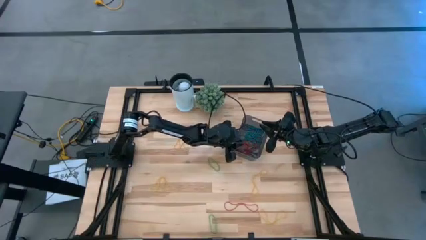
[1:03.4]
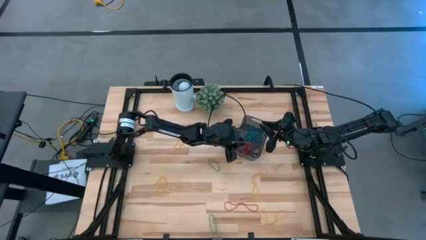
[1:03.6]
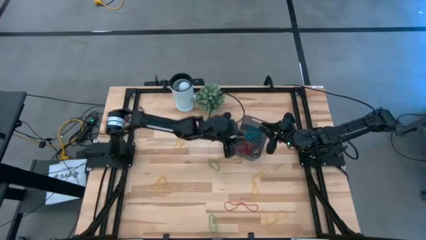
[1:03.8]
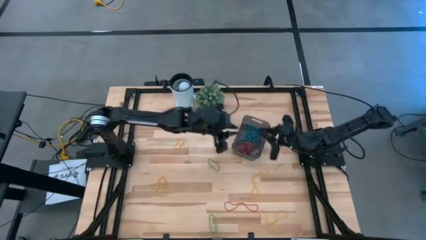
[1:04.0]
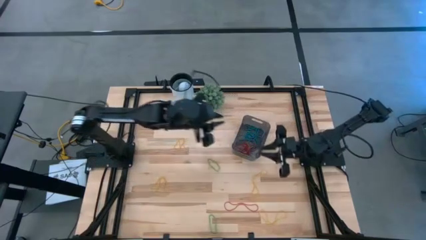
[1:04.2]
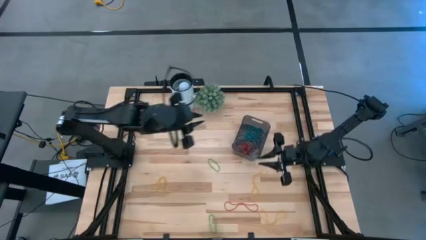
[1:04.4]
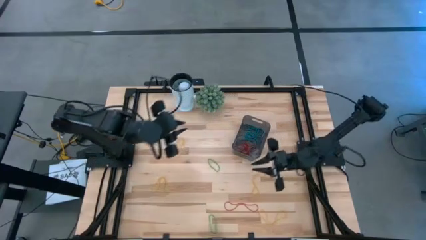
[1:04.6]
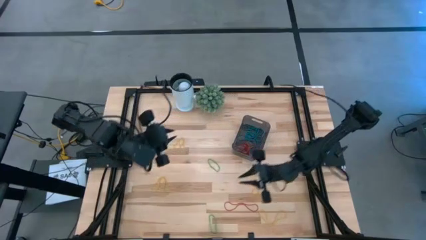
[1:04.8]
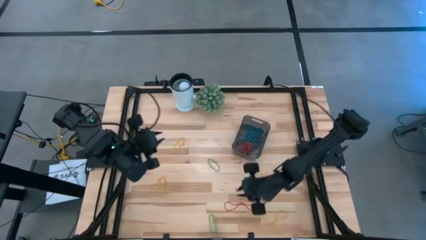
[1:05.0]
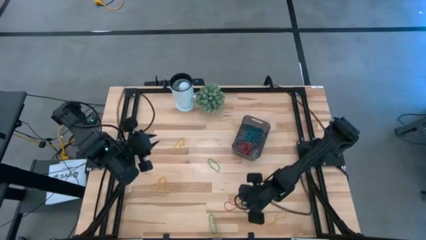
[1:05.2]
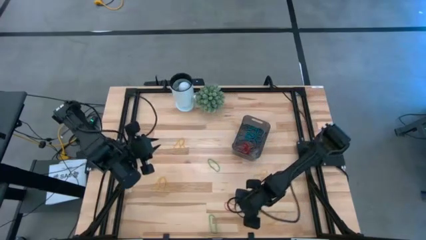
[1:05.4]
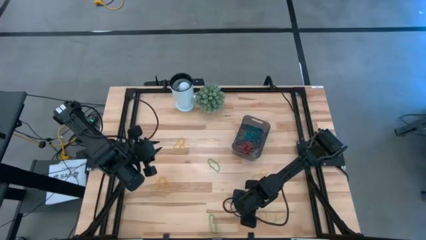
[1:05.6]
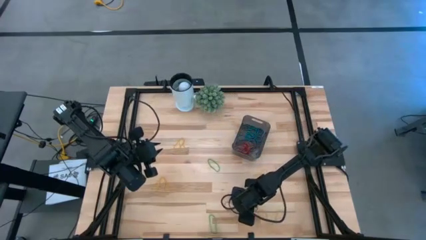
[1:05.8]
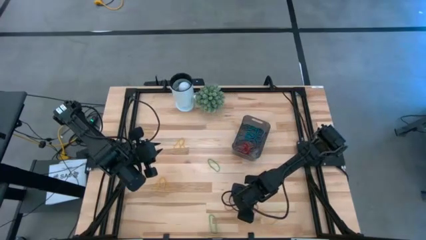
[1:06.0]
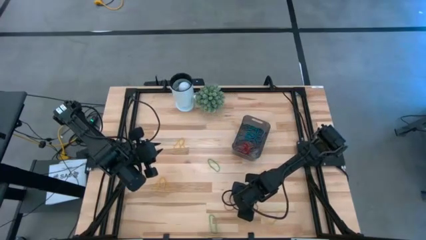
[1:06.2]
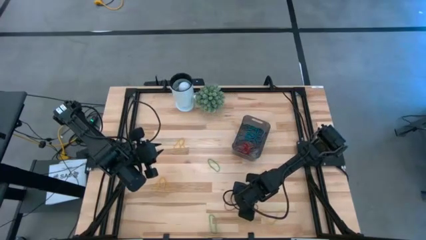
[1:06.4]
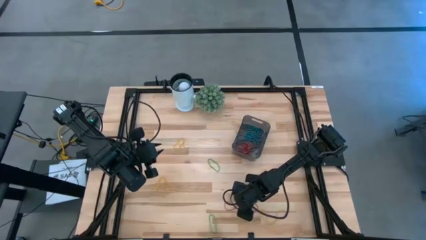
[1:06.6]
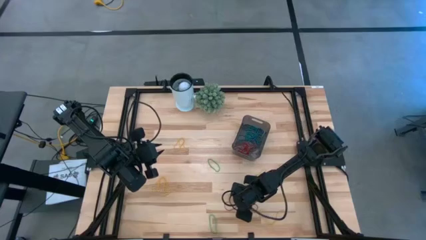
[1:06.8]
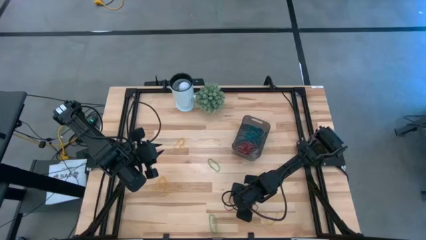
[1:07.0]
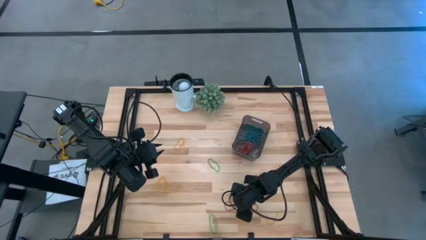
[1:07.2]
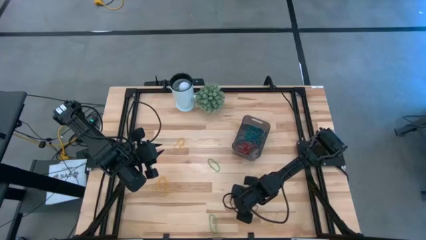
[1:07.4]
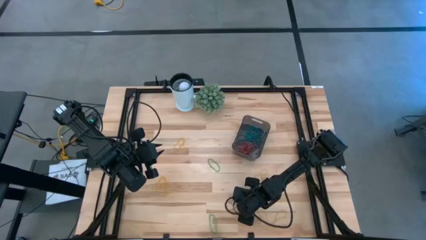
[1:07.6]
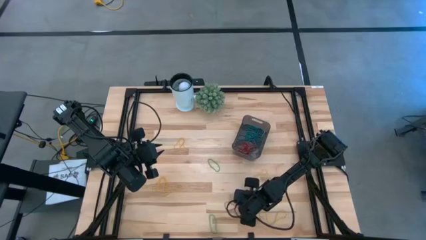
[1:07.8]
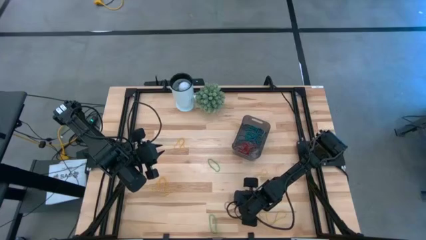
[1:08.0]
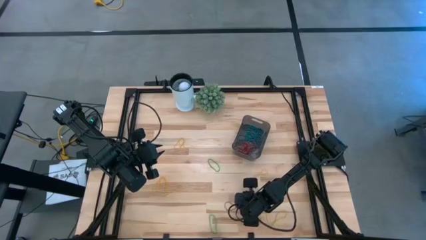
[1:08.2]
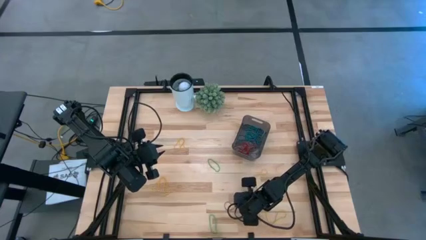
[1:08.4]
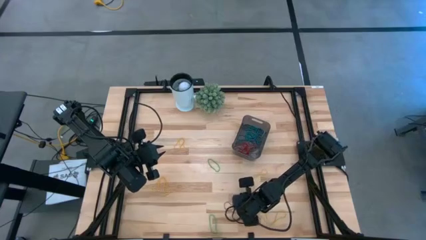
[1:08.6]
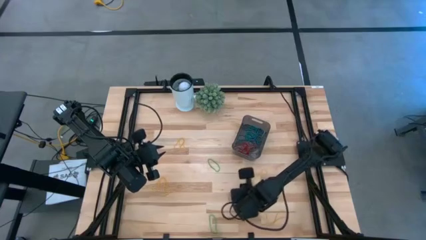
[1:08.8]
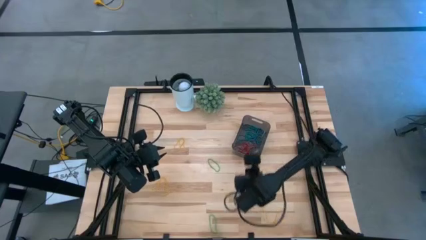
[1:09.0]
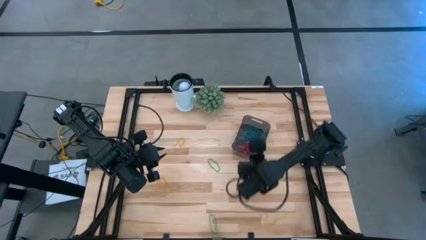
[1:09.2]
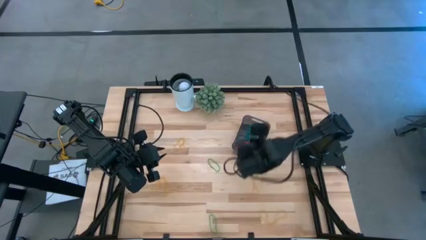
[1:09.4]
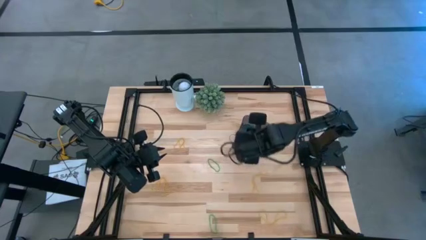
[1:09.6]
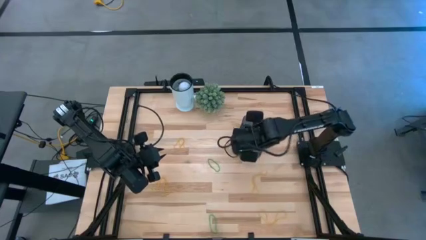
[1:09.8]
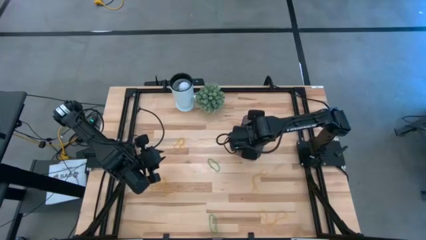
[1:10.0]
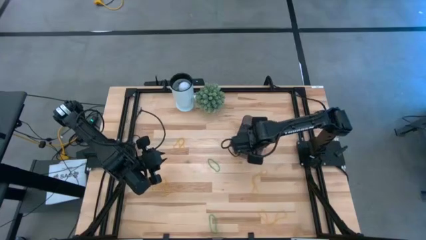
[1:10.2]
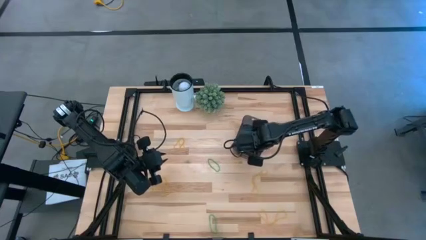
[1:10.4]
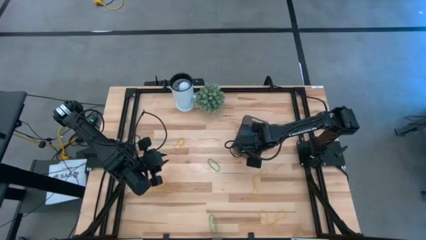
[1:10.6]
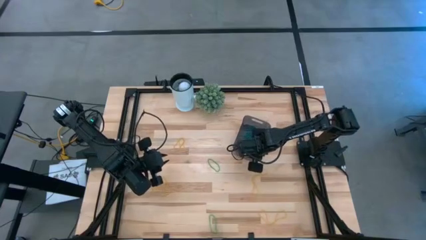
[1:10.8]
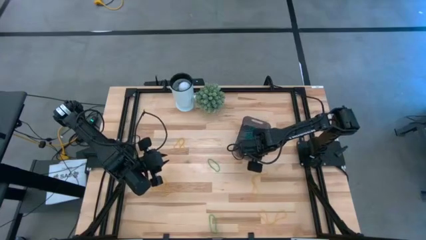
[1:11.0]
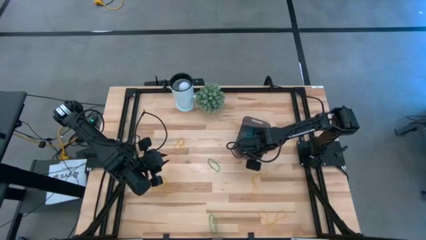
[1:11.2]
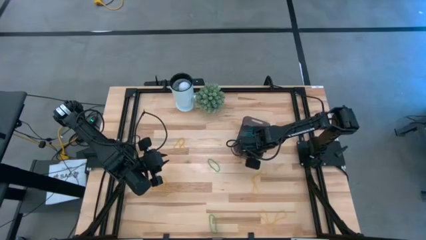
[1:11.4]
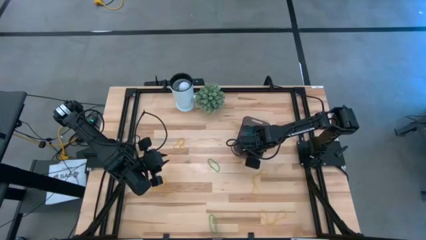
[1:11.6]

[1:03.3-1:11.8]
Task: Pick and place items into bin
Put the red rubber band into the black bin

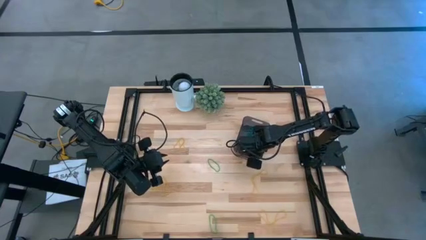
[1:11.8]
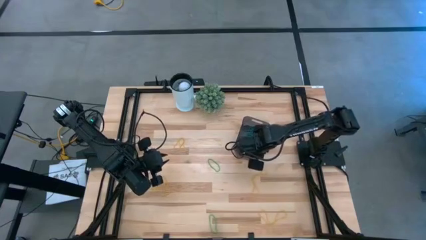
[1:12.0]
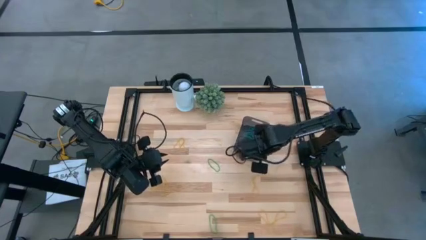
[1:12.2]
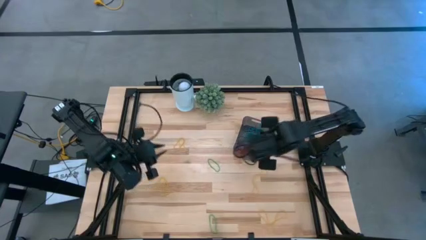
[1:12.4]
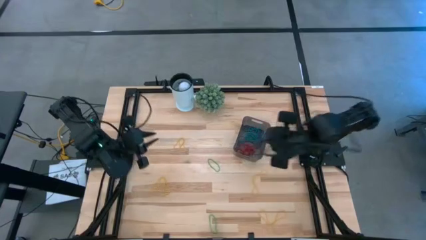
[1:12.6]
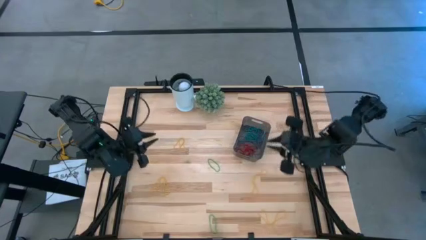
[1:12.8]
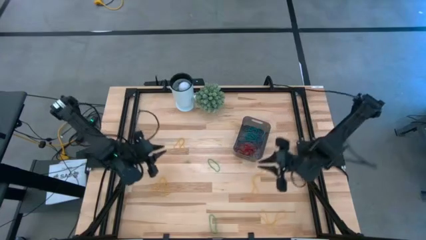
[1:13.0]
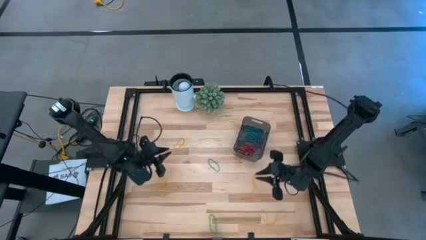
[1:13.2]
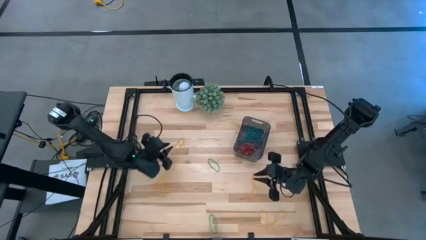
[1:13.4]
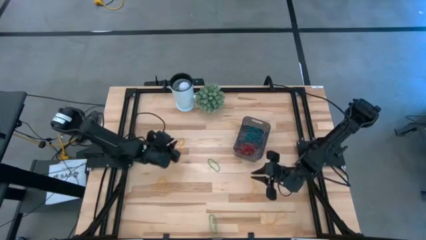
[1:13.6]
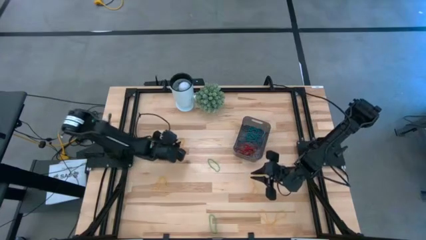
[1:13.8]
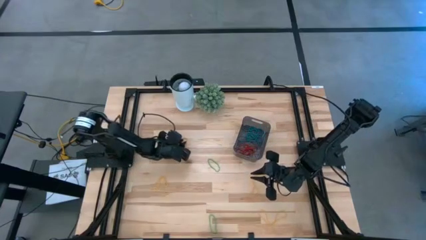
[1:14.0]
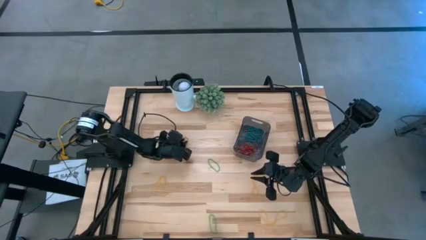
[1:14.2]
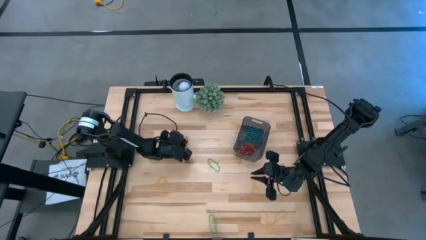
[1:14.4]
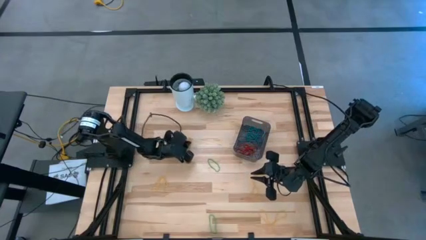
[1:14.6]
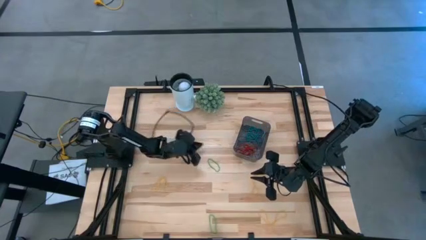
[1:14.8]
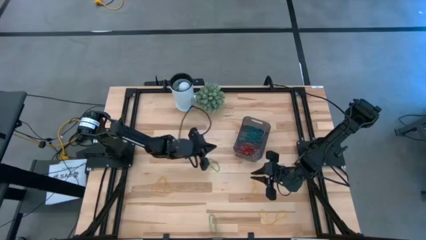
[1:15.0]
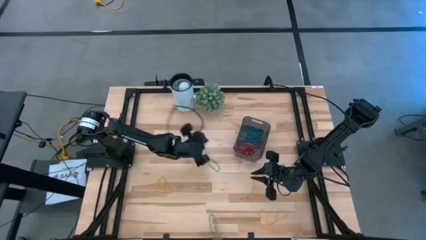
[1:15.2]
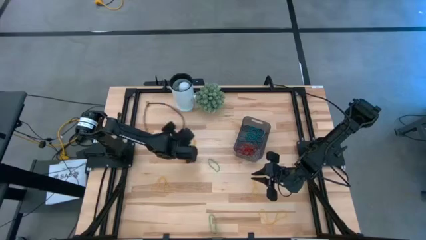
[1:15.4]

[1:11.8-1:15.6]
Put the yellow rubber band into the black bin

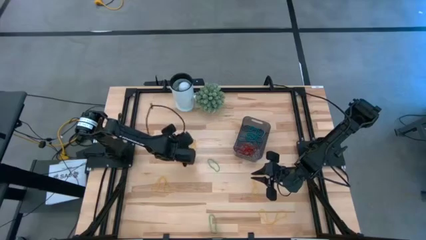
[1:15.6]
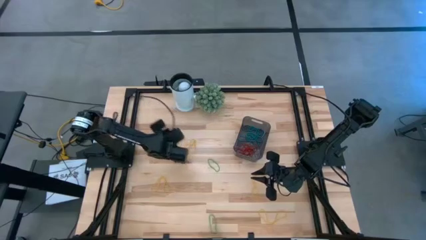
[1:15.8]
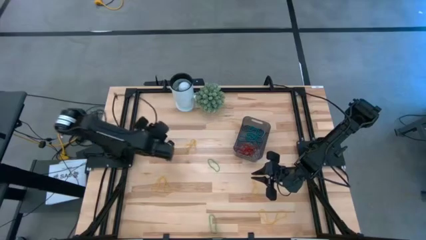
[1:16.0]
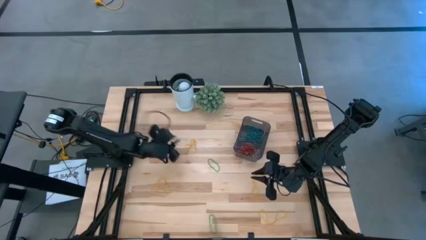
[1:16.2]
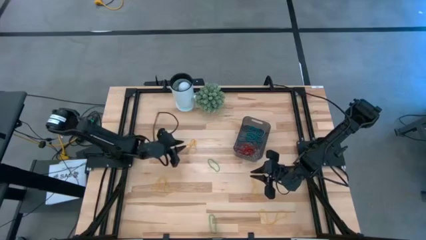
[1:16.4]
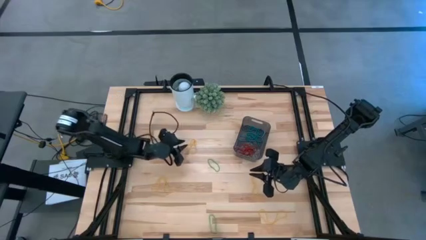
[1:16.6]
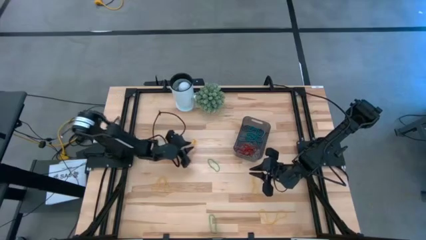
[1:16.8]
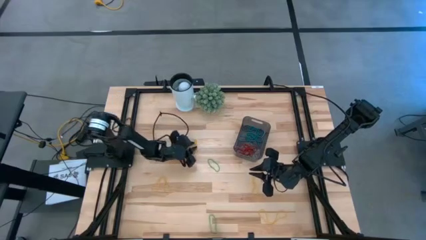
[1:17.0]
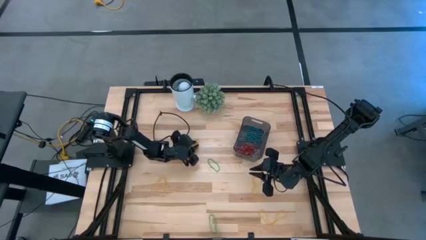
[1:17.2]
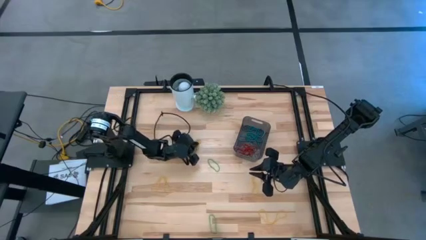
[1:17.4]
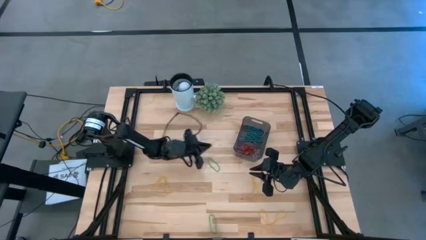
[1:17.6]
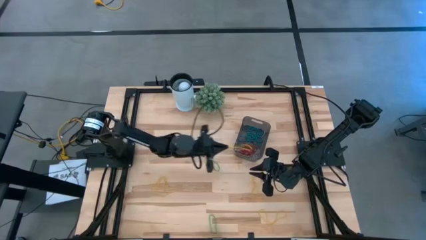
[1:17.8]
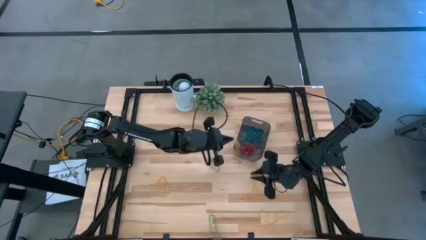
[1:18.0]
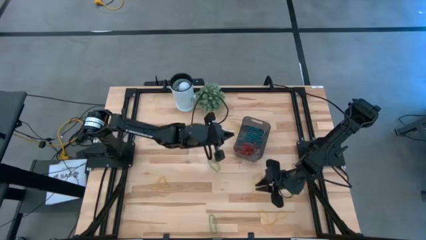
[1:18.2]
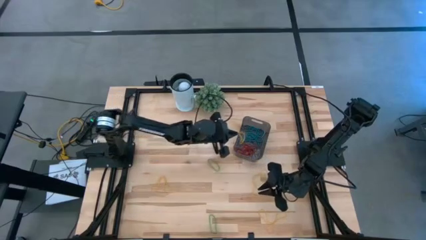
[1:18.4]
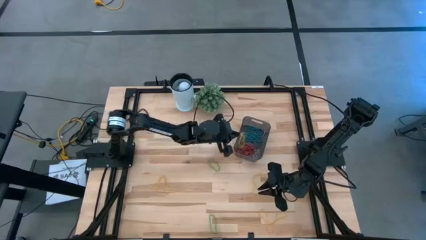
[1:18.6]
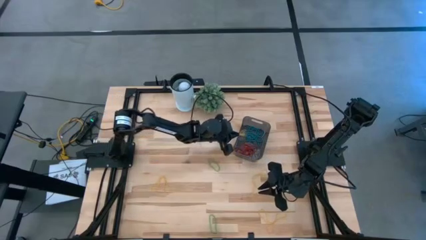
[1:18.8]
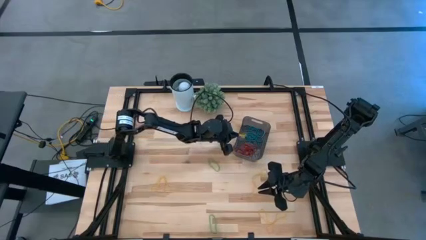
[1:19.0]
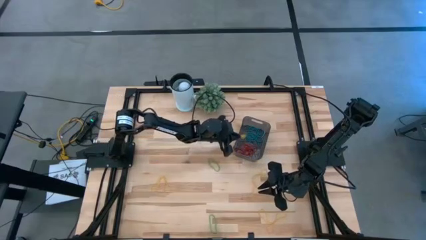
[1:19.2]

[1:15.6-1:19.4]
Put the yellow rubber band into the black bin

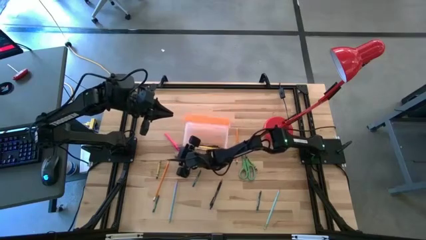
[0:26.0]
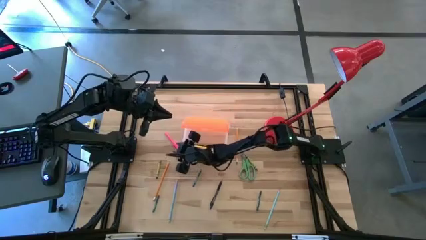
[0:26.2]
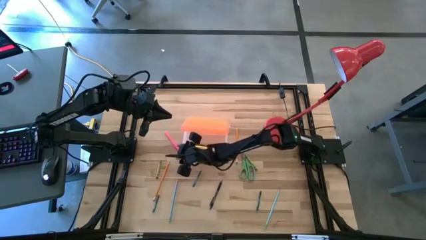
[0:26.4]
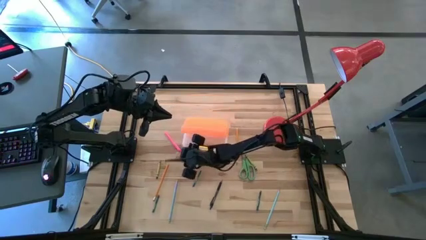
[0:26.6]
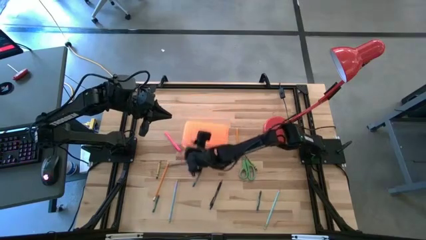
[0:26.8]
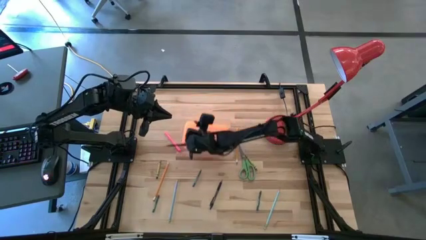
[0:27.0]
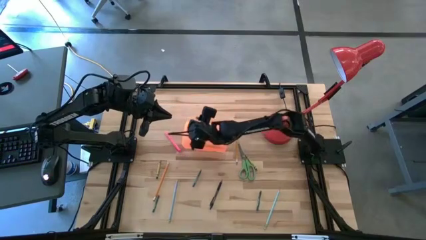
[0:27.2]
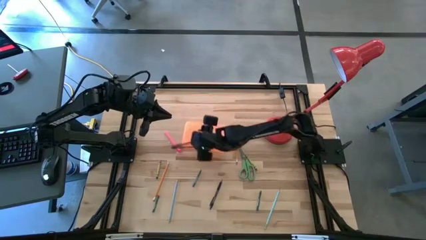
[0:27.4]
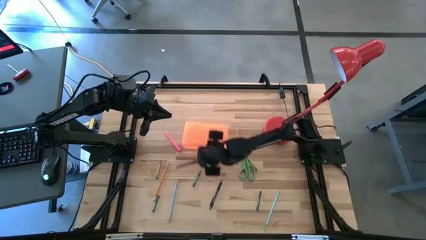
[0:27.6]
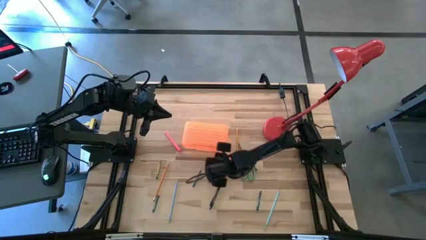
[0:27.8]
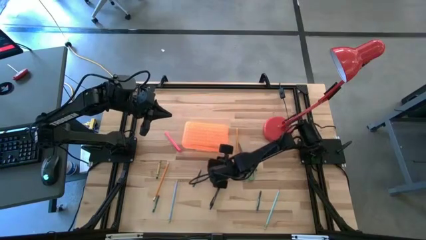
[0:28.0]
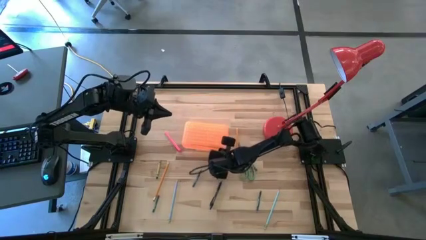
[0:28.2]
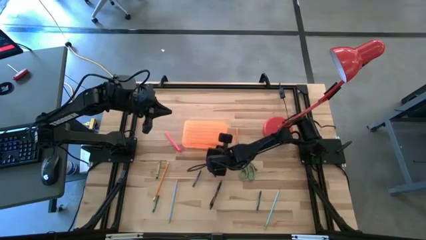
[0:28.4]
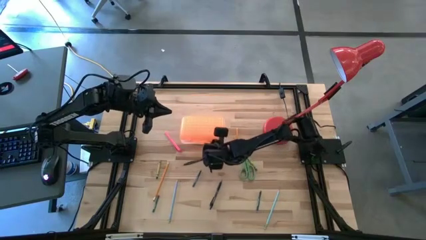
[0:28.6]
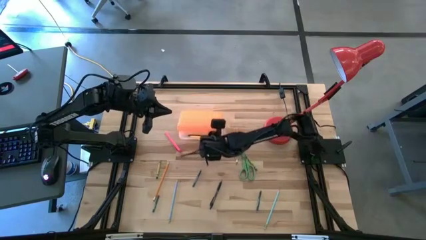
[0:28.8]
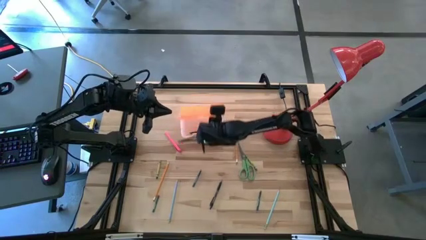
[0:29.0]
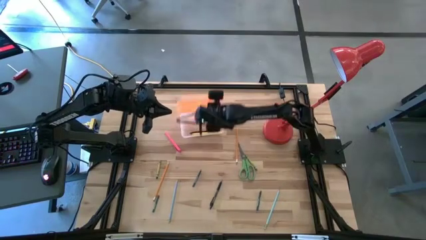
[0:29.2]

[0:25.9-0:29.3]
Task: Pick & place school supplies into a supply box
Open the orange supply box
